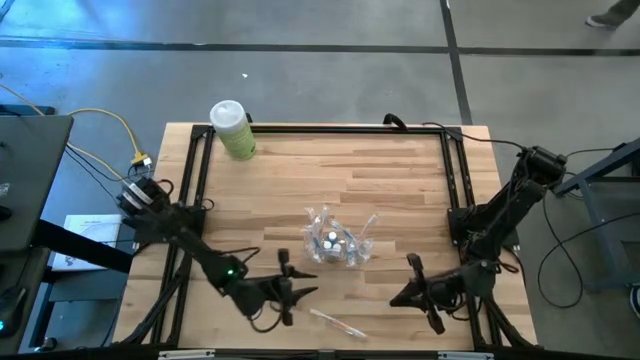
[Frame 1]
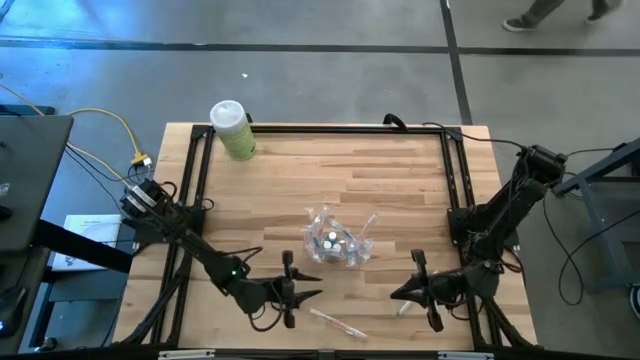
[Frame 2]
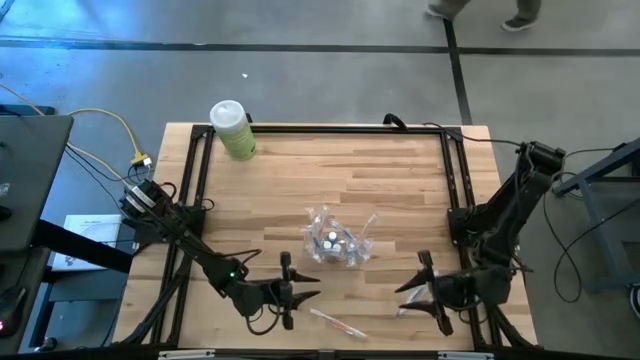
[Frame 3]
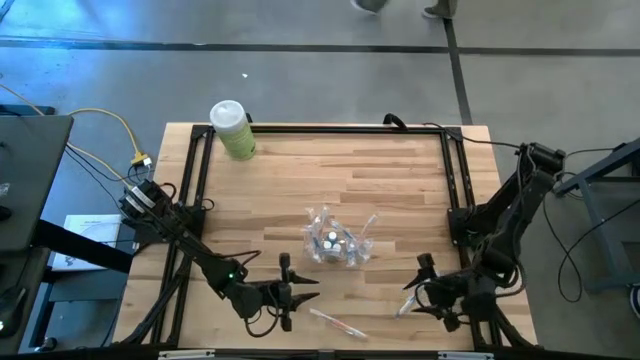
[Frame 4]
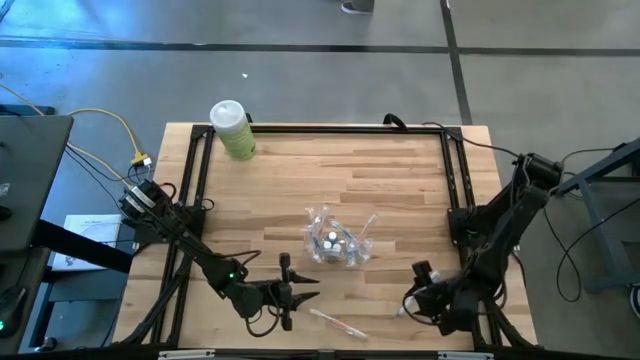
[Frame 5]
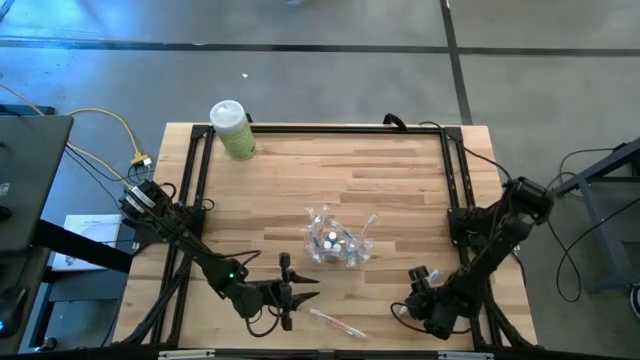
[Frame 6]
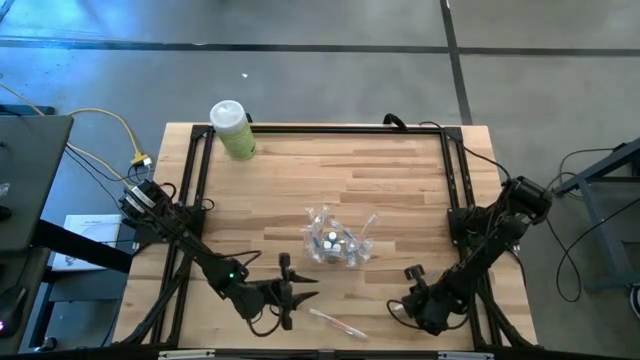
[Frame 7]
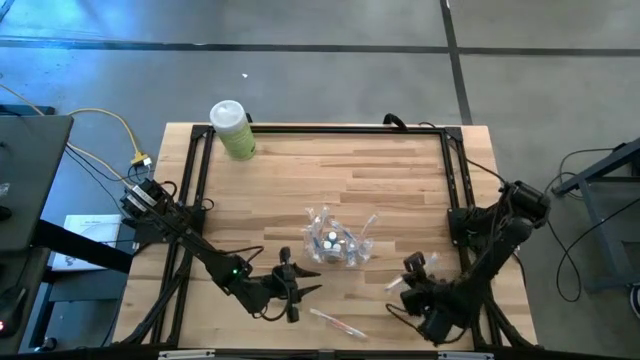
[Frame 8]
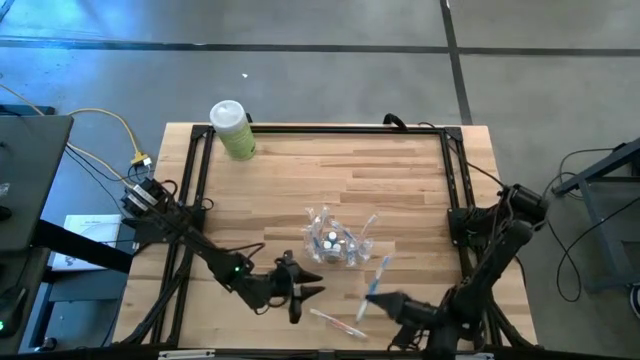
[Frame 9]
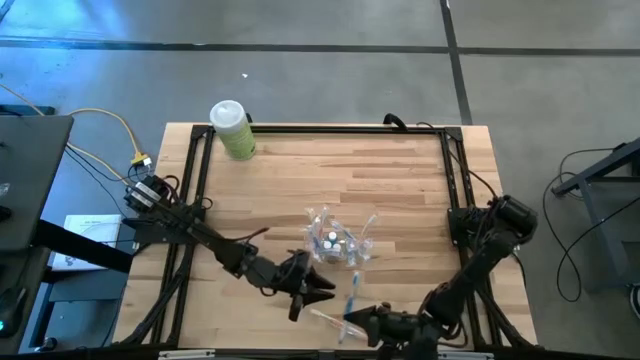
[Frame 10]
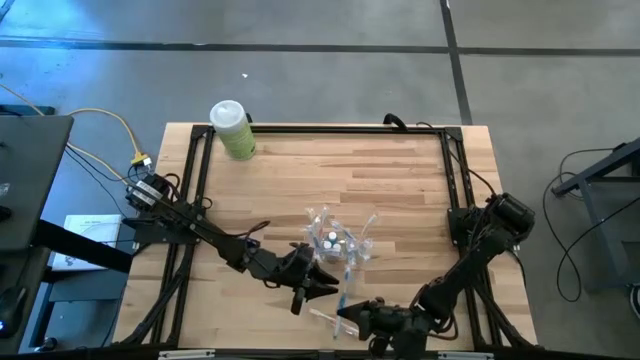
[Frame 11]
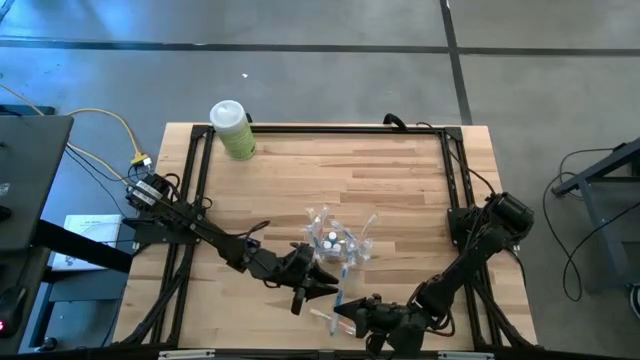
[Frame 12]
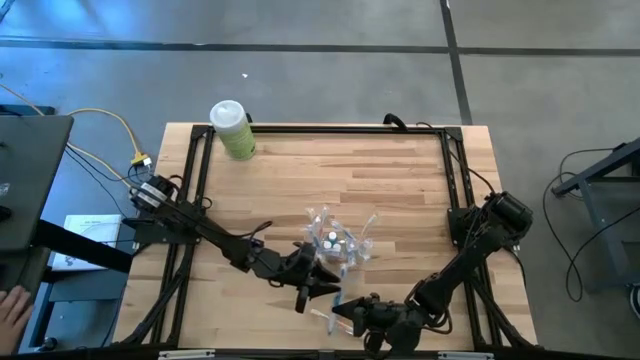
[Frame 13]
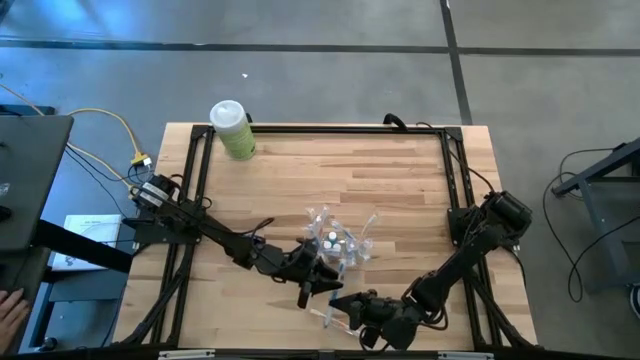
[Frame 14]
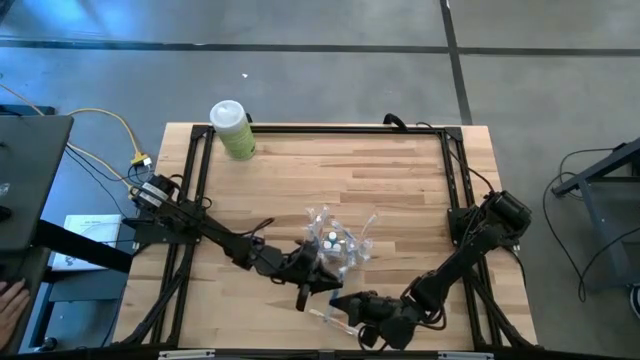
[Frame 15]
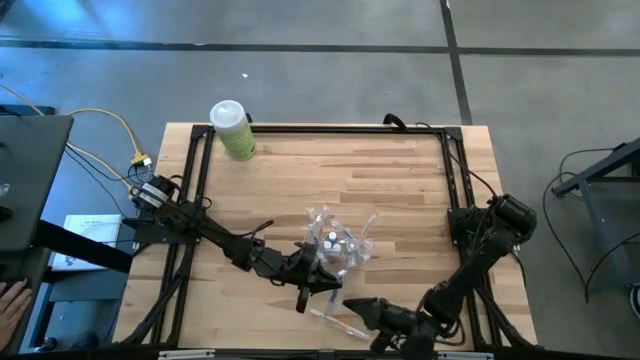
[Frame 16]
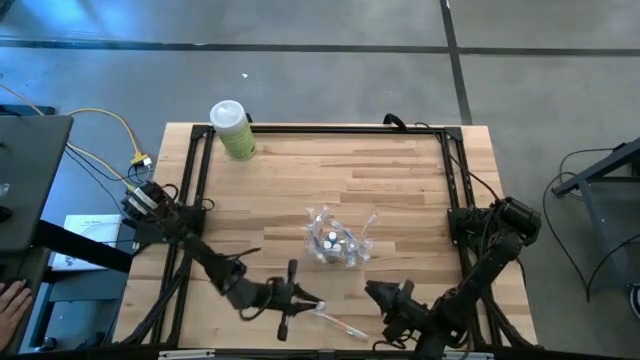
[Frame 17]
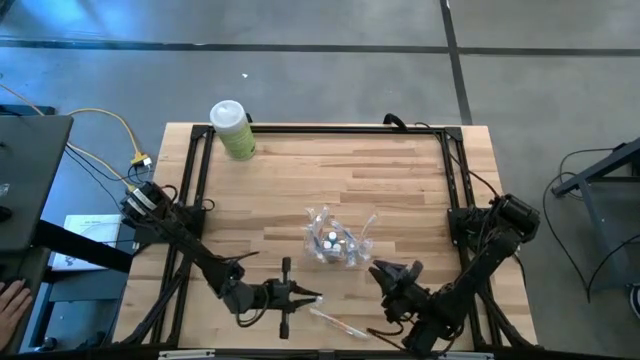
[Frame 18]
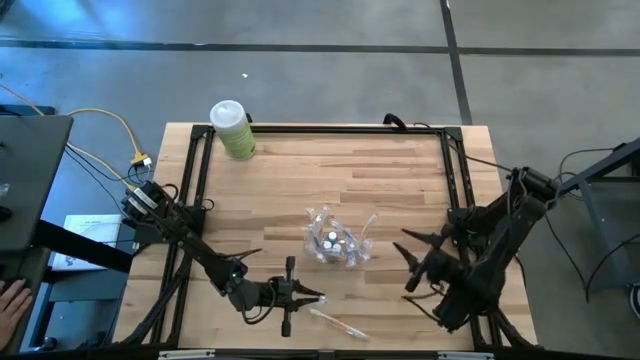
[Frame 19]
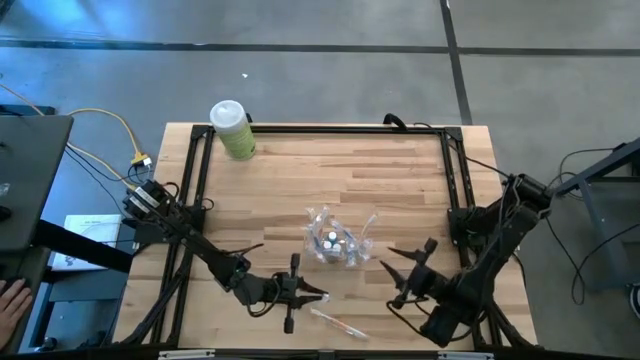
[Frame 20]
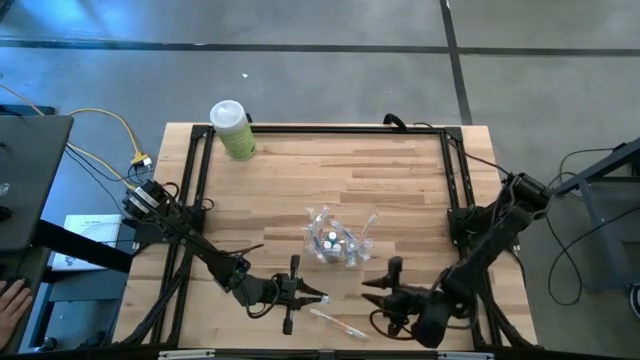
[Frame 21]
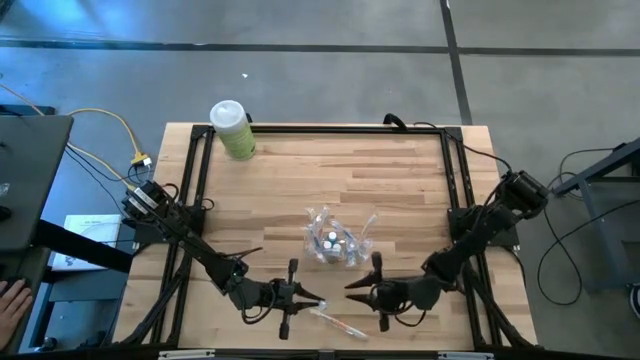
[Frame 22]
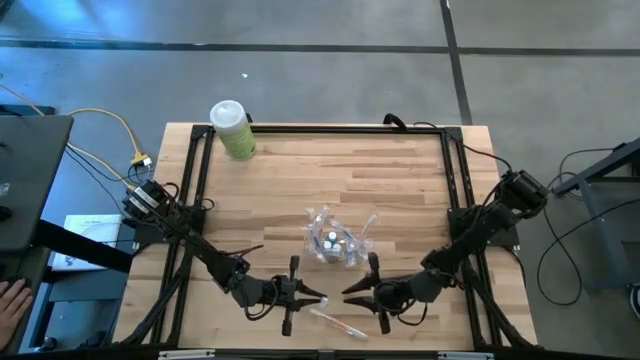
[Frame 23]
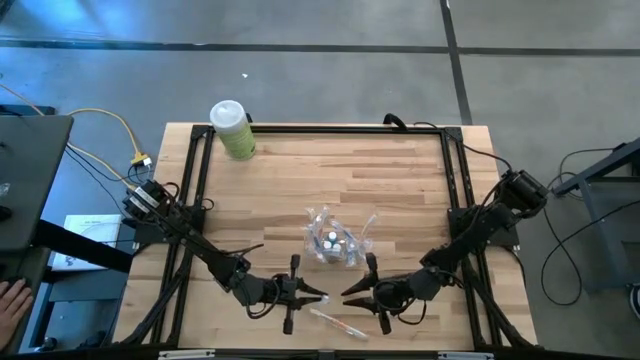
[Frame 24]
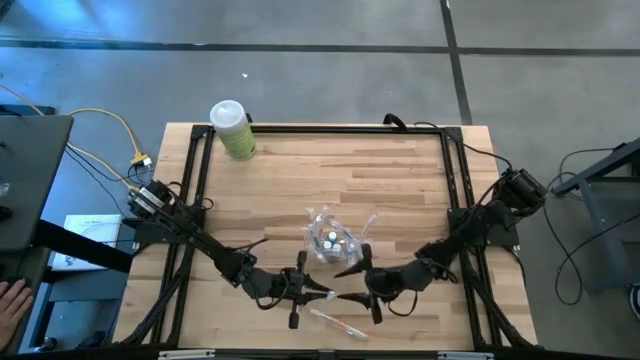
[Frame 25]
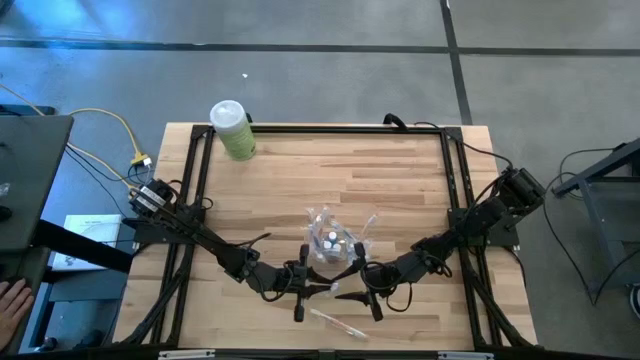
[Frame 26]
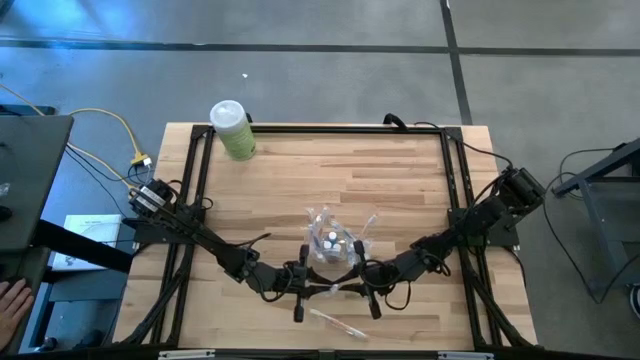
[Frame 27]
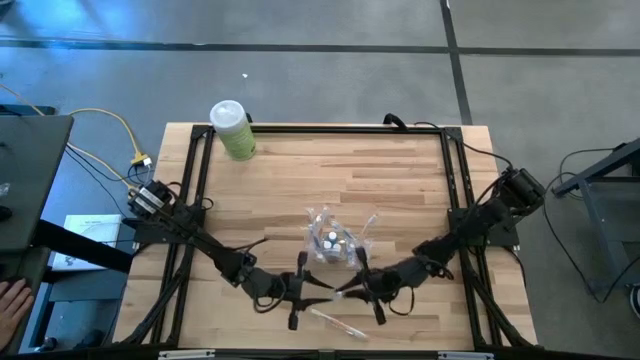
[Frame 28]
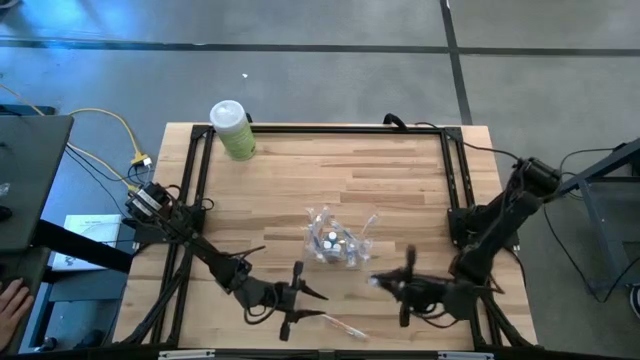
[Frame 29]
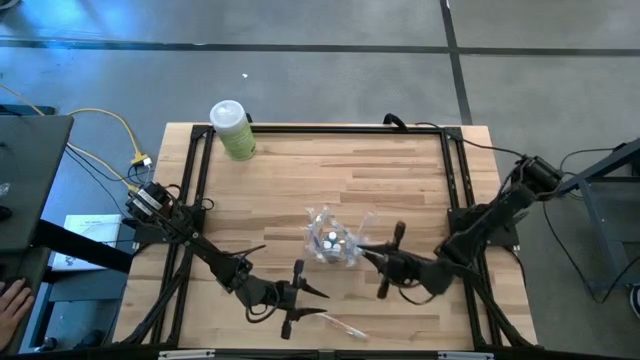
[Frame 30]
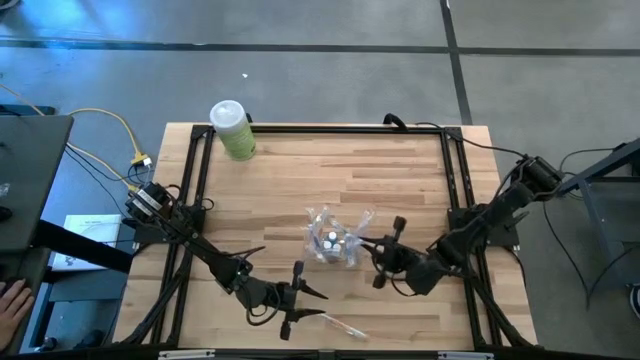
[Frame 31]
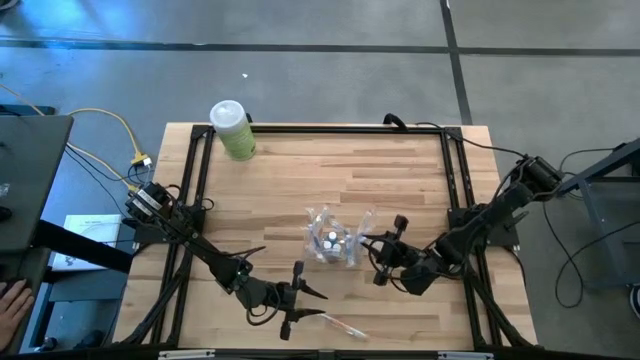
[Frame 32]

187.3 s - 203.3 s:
Task: Pick & Place toothbrushing station
Put the blue toothbrush into the transparent organizer

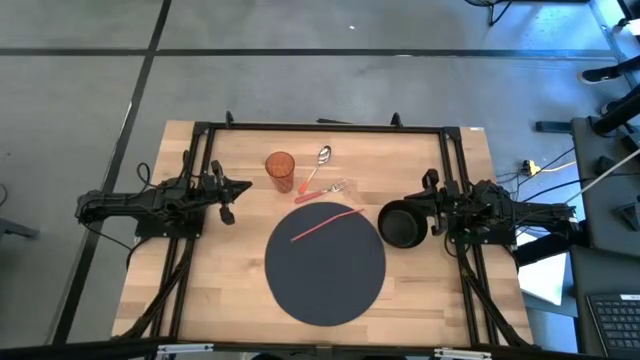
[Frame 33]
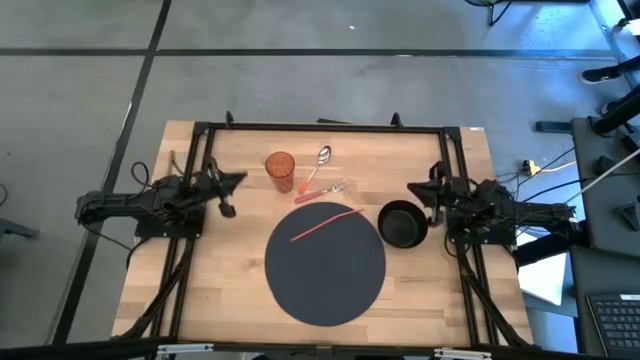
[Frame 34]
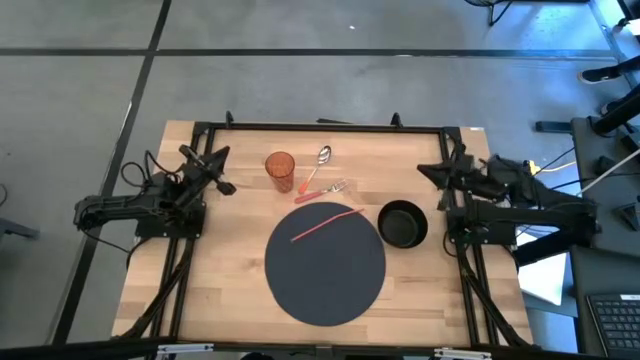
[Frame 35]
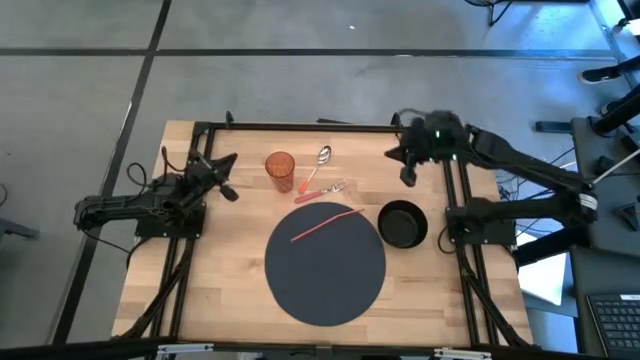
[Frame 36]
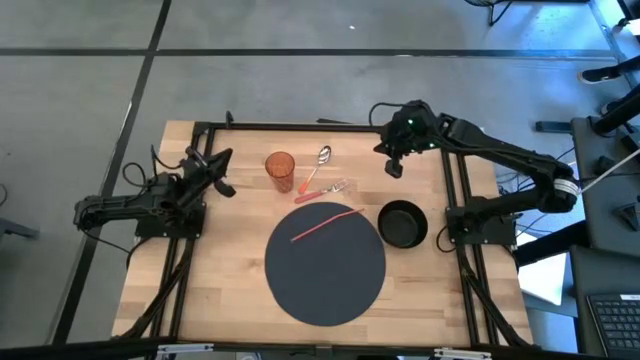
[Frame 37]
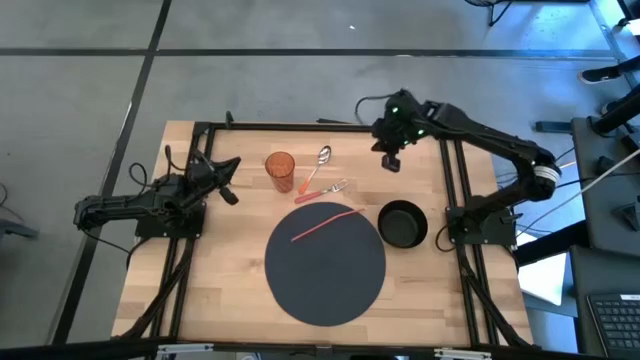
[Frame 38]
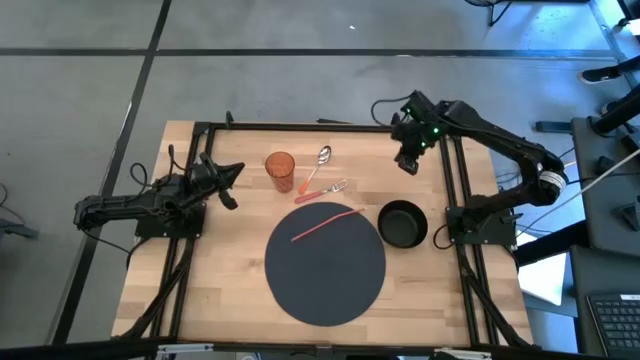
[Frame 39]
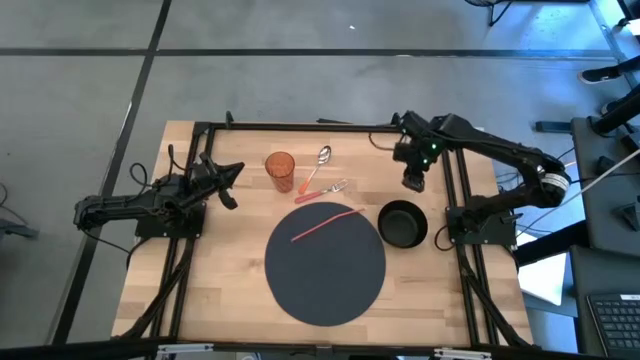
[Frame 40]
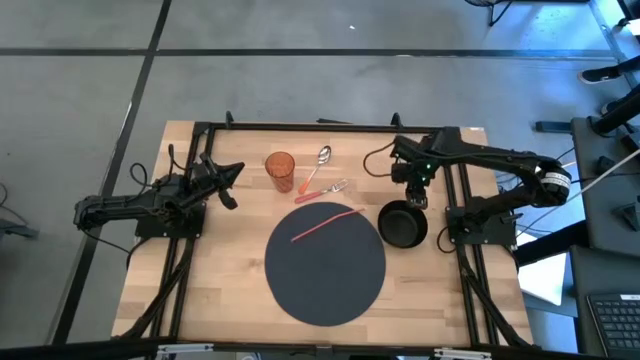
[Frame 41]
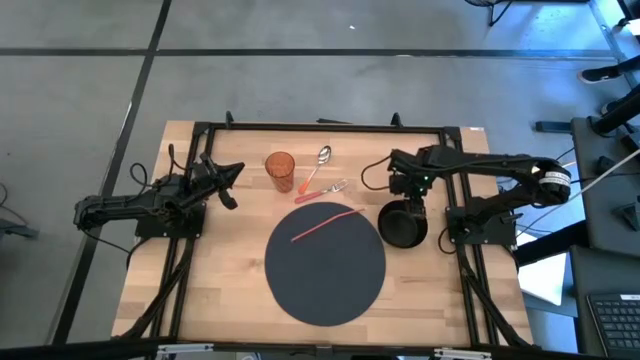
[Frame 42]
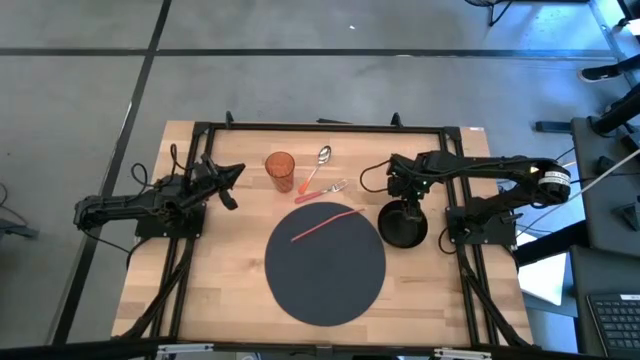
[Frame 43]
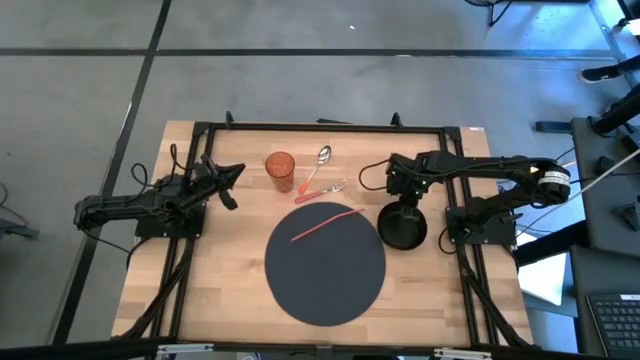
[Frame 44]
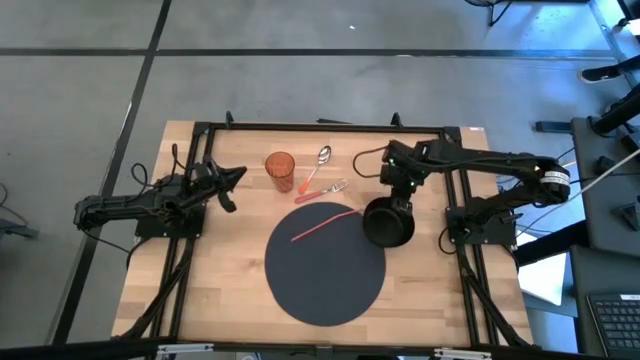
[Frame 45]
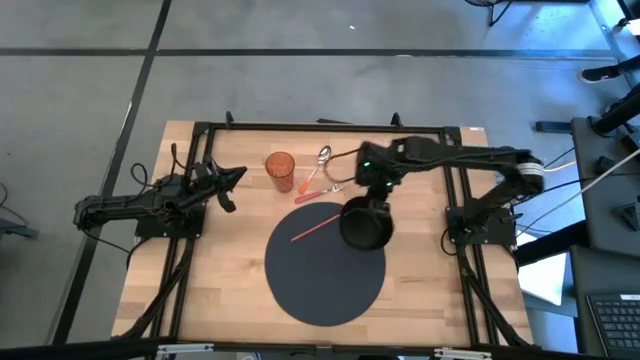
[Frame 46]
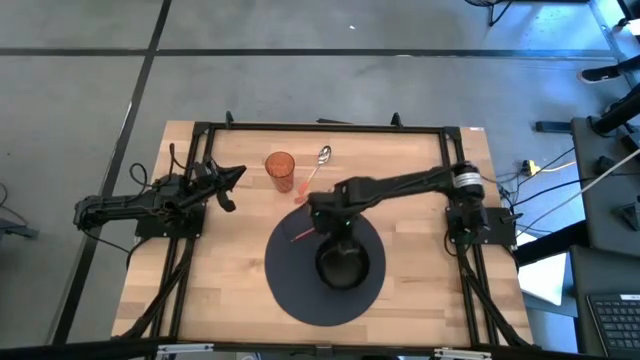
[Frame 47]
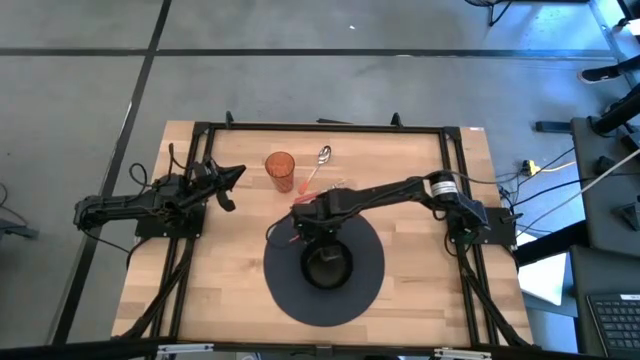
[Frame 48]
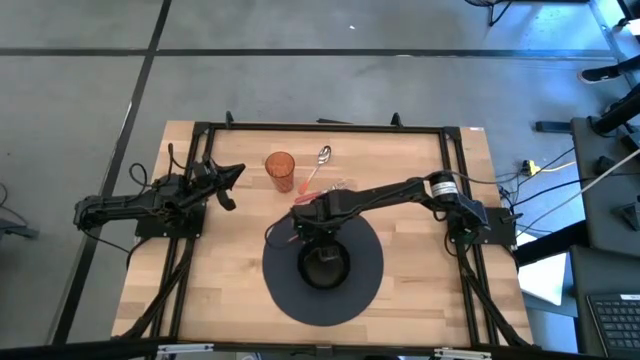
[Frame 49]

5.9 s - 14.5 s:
Task: Pick & Place Utensil
Put the black bowl on the black mat
